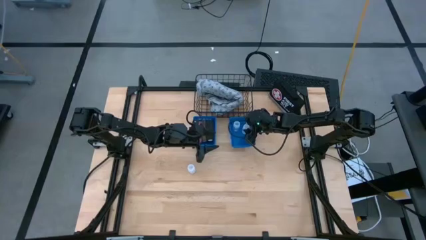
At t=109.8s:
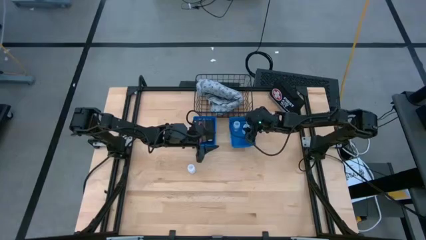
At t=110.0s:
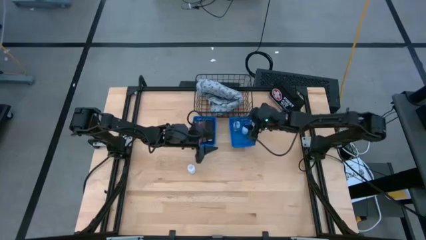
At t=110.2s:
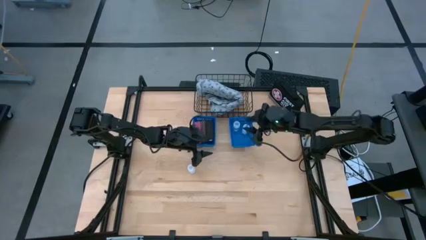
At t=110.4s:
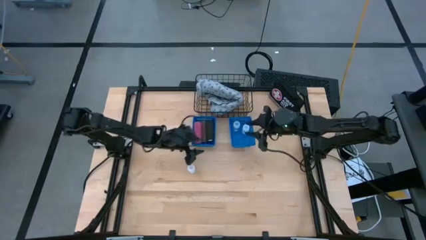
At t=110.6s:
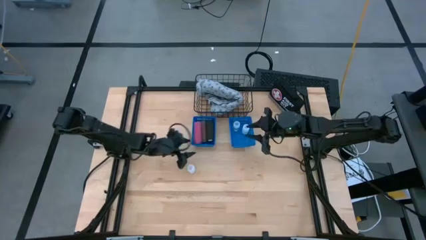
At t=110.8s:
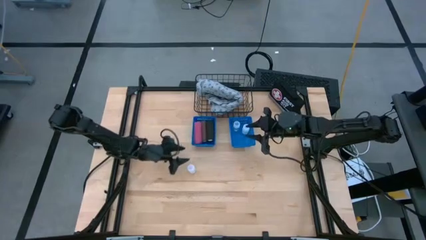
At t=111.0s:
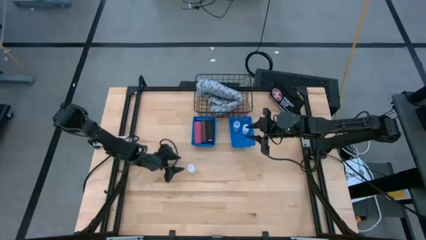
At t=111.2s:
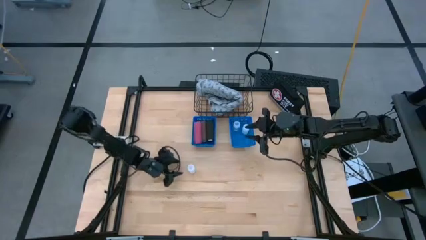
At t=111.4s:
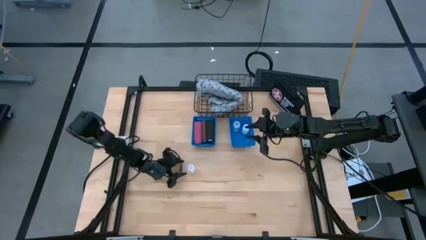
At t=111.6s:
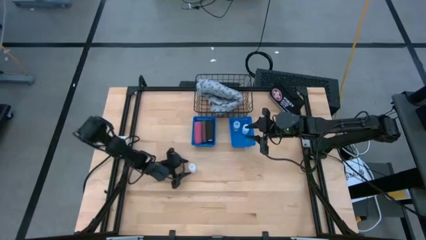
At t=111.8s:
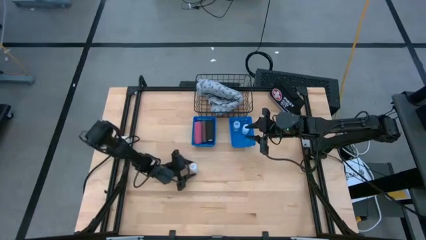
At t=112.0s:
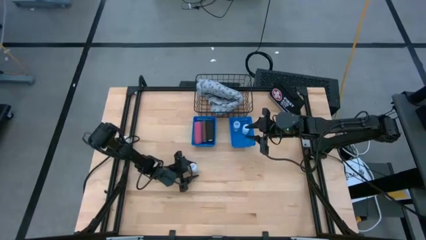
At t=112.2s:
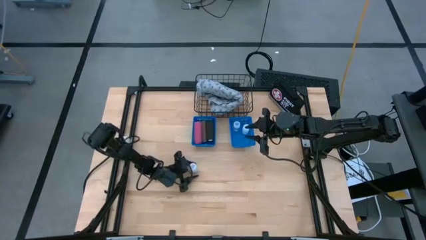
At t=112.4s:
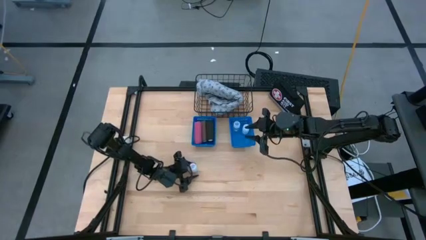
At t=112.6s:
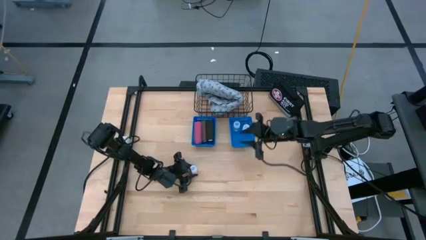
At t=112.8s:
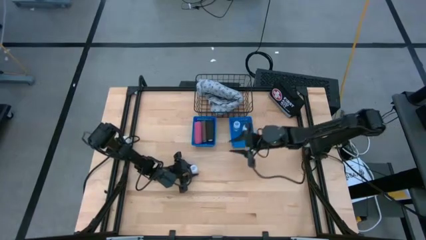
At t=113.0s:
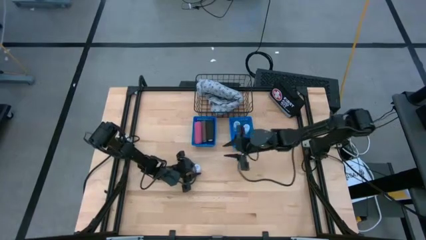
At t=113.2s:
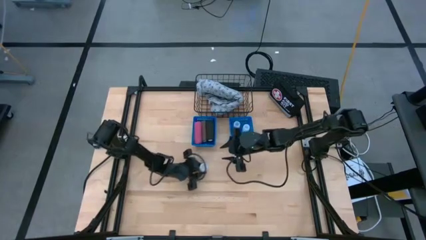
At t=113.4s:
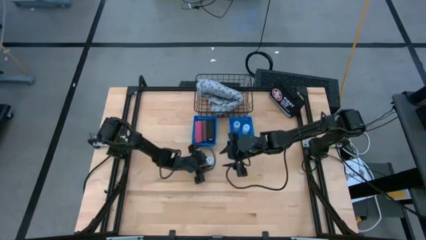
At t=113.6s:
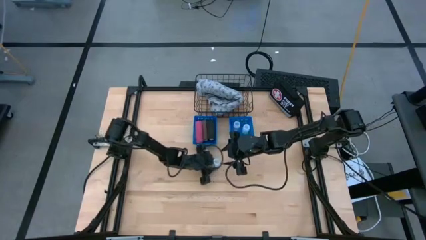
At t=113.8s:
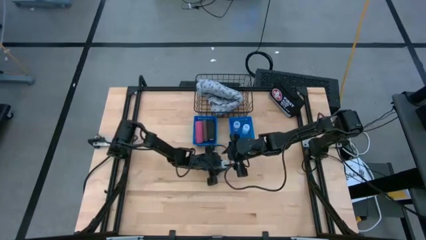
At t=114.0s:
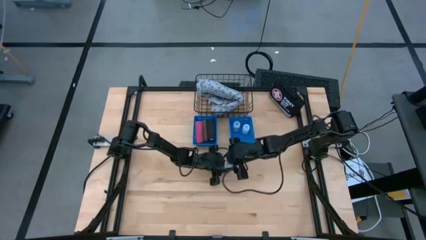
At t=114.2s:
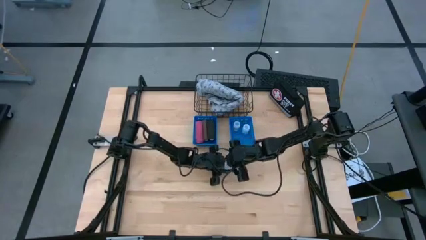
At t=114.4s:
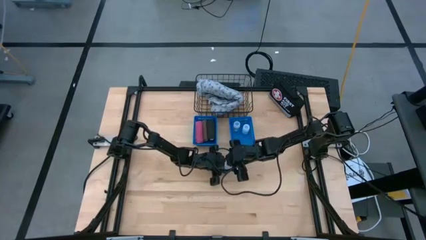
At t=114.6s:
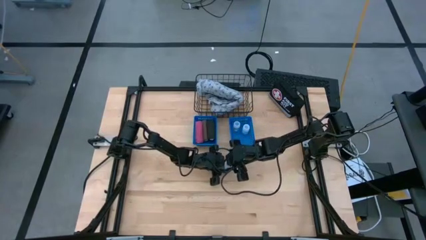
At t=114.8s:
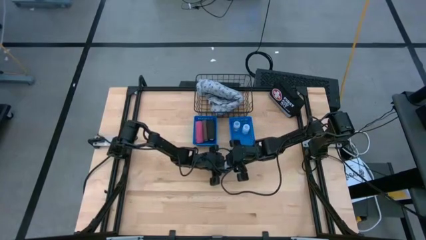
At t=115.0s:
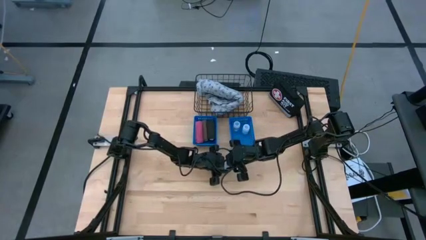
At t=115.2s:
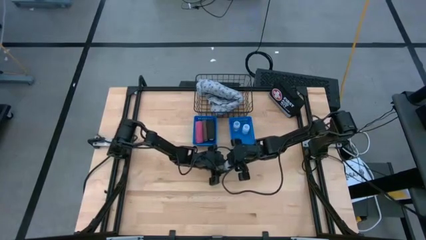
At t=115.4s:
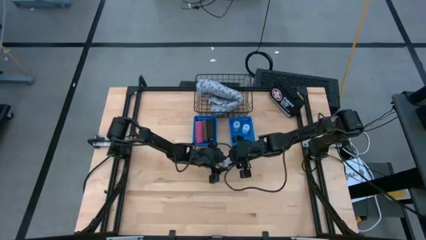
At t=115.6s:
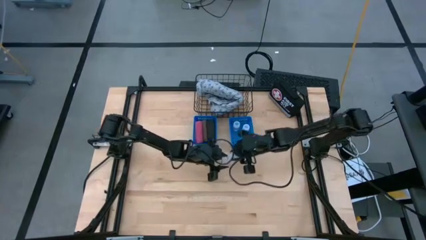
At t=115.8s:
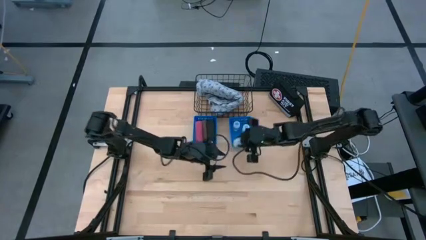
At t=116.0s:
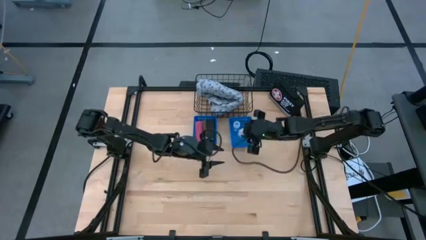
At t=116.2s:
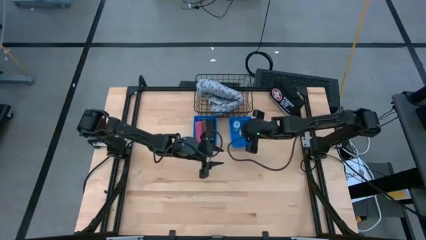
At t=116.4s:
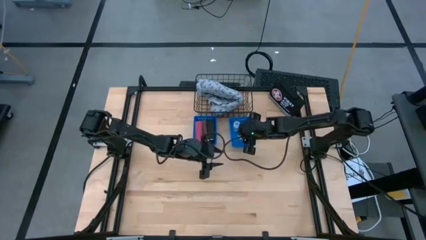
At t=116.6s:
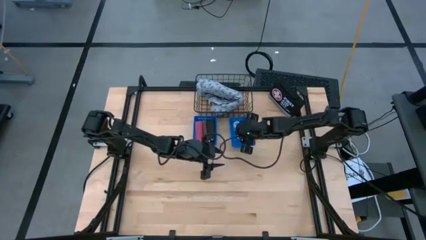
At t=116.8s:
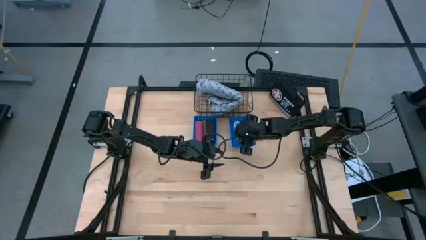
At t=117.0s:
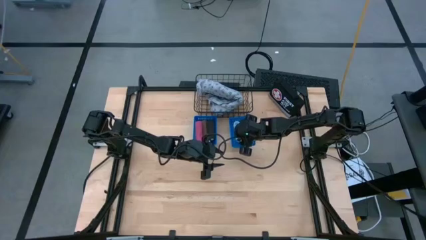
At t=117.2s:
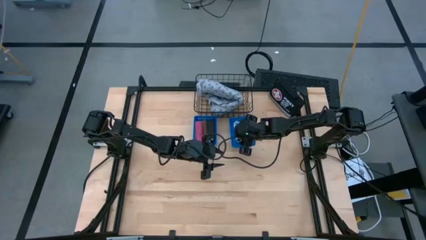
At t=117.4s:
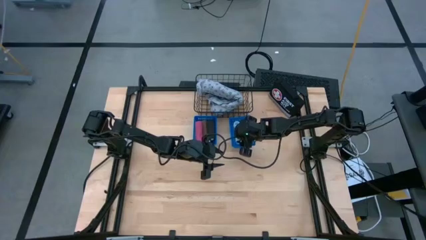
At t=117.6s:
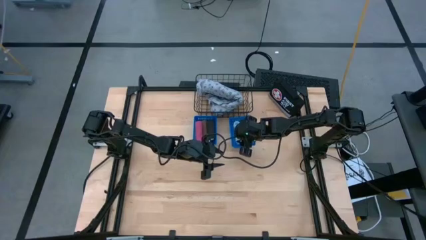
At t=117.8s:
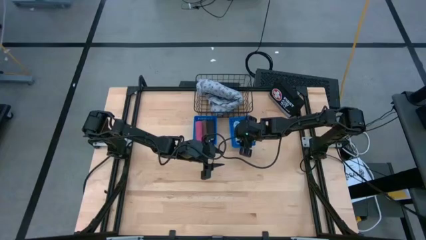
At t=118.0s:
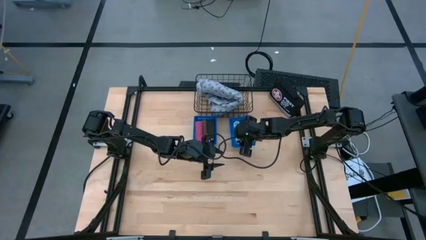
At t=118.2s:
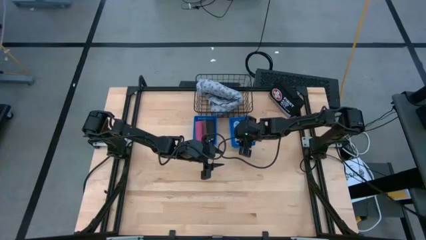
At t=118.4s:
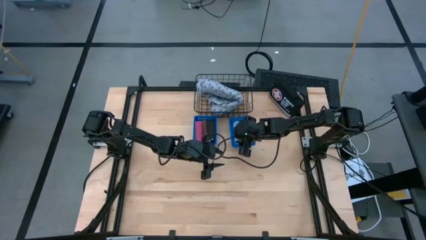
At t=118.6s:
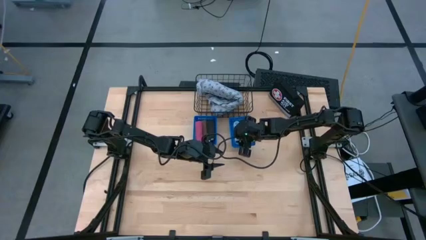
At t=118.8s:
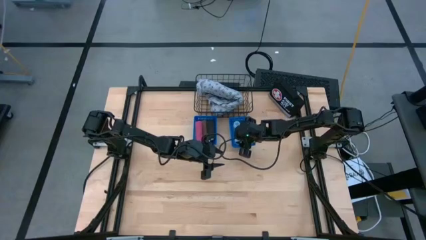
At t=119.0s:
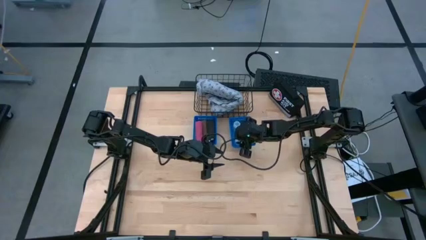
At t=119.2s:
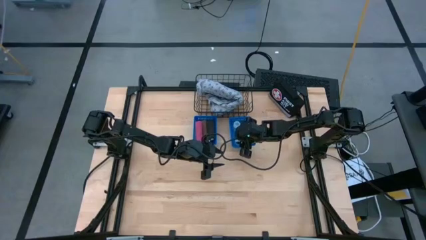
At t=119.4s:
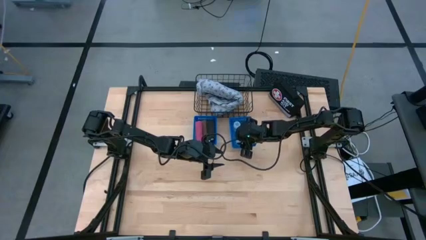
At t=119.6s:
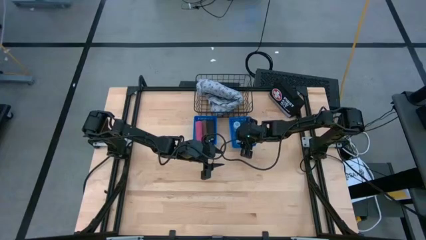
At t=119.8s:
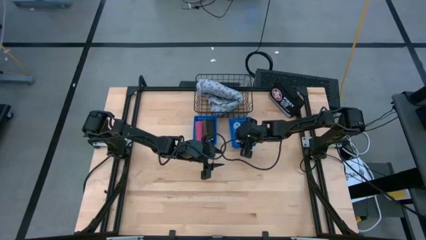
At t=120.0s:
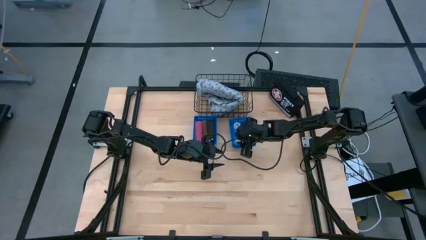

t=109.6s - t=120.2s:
Task: Pick & Place Medicine items
Put the white pill bottle into the right blue bin

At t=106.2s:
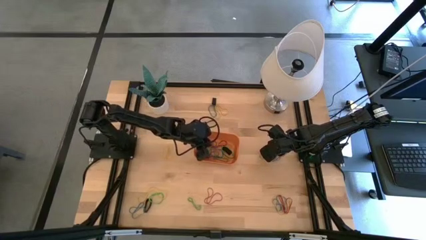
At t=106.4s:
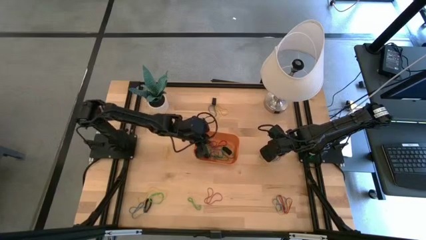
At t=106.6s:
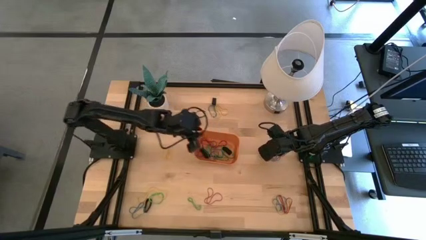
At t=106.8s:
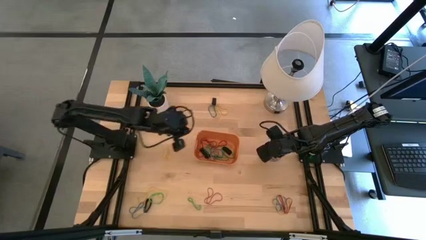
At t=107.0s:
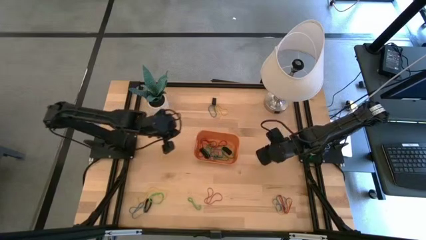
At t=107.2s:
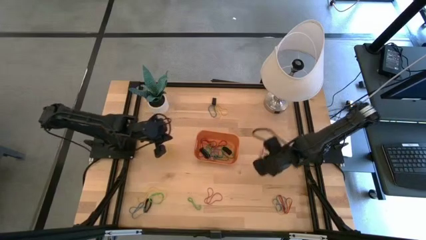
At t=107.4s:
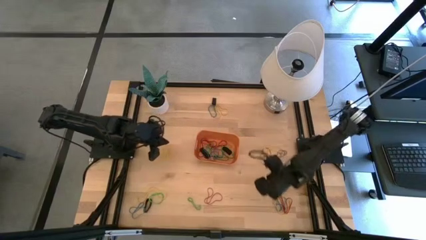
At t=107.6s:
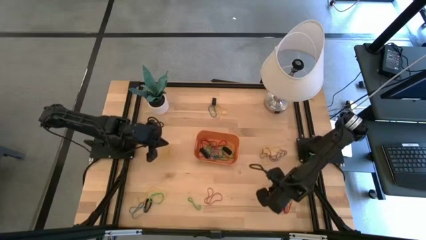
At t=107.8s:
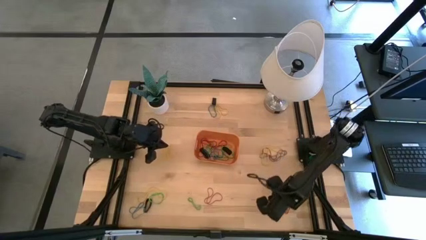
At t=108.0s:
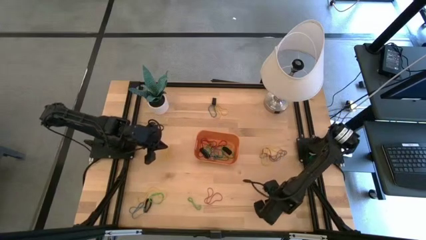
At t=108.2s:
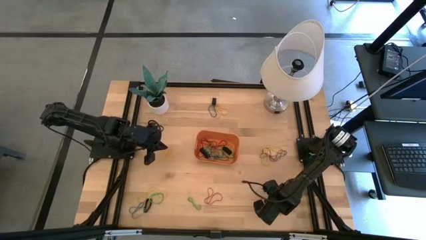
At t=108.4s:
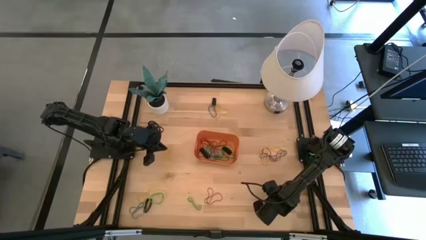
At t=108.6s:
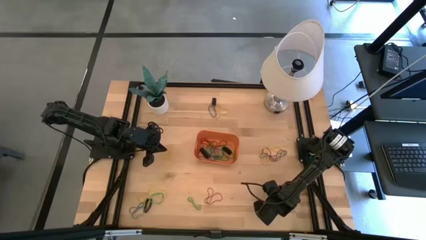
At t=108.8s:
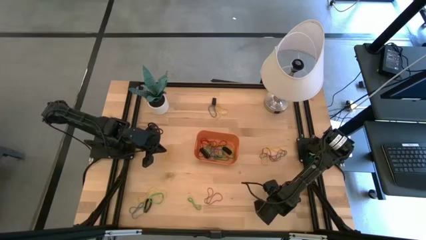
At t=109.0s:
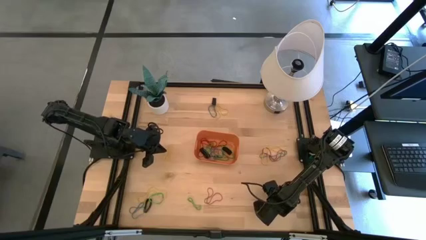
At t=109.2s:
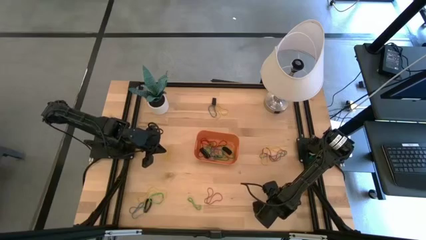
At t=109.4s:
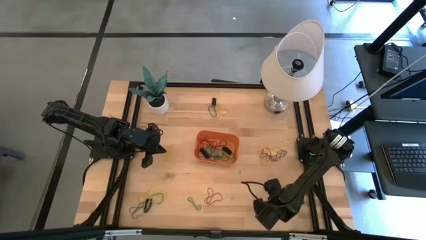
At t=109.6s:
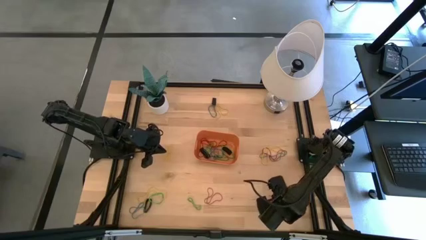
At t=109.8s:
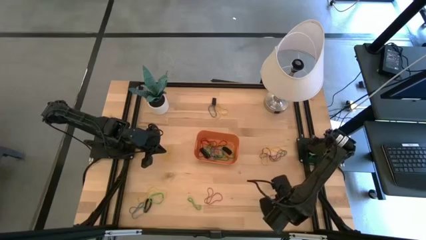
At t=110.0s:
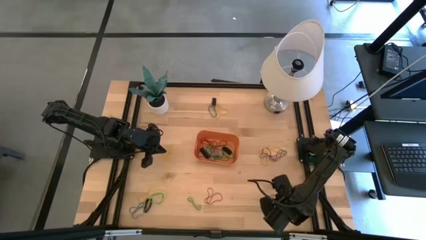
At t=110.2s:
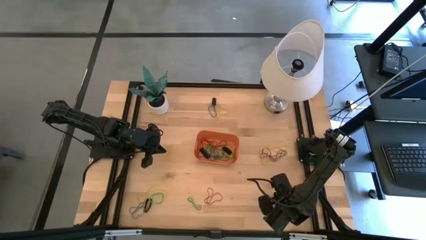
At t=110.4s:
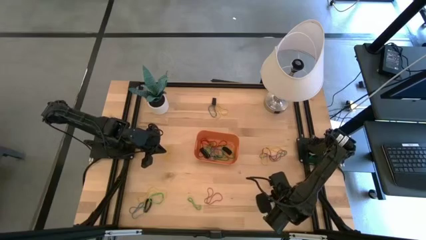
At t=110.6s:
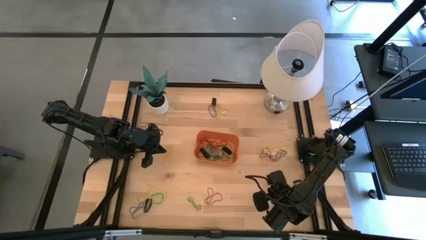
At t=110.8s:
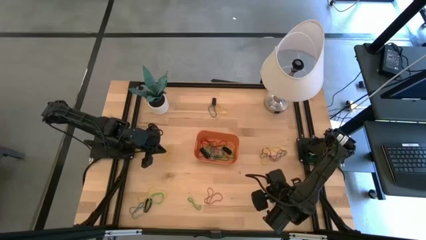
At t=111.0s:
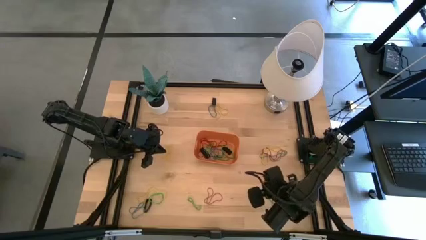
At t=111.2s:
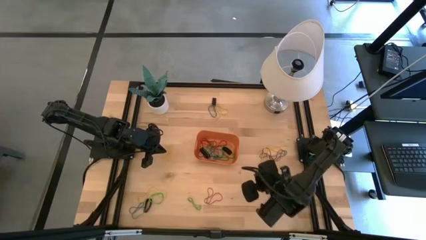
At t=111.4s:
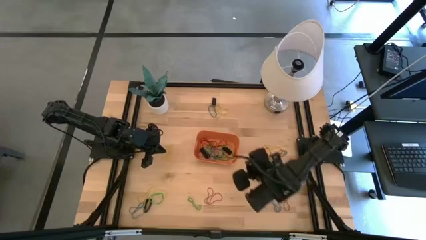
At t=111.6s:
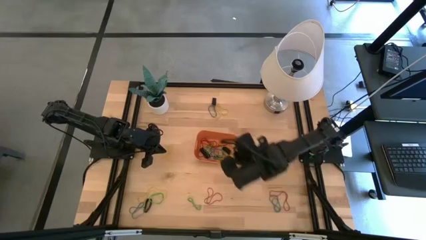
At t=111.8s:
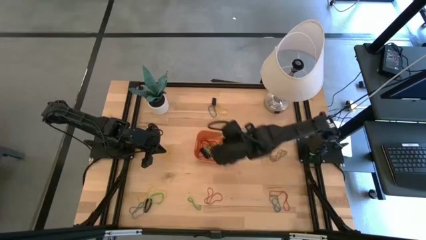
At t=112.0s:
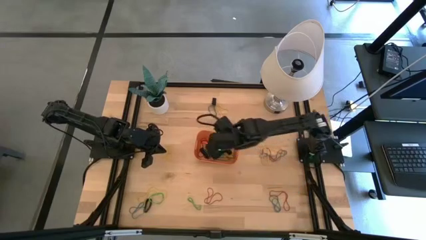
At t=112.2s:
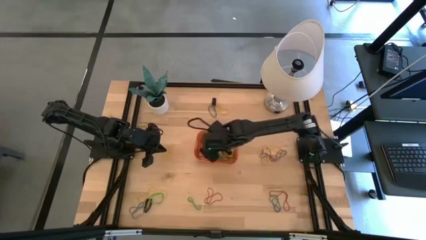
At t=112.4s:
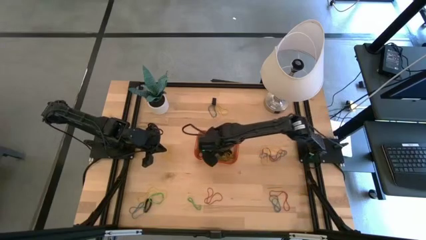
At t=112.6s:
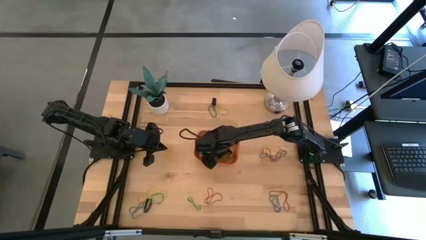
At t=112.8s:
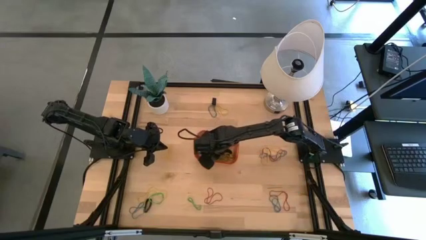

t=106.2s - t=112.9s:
Task: Pick and place rubber bands into bin
Put the yellow rubber band into the orange bin
